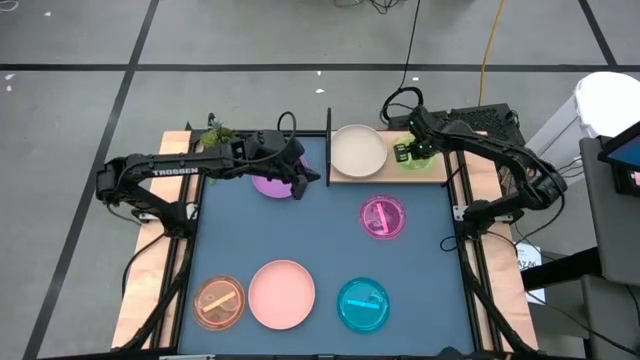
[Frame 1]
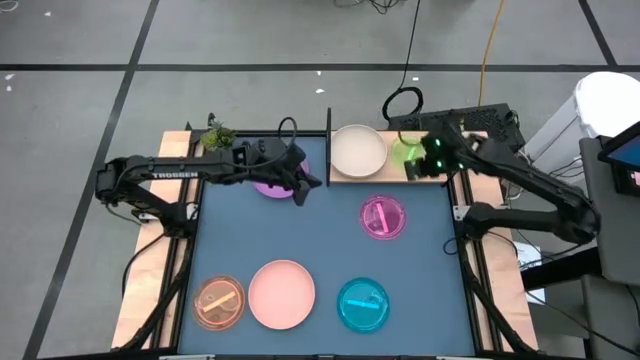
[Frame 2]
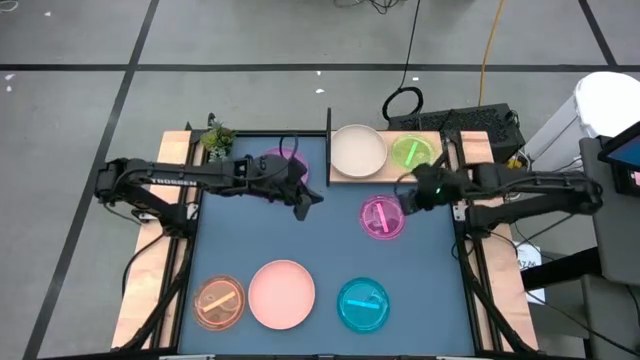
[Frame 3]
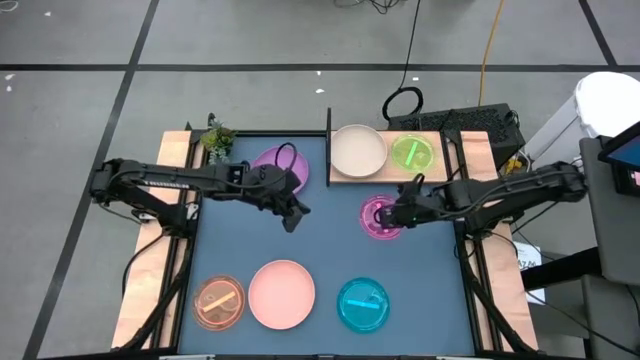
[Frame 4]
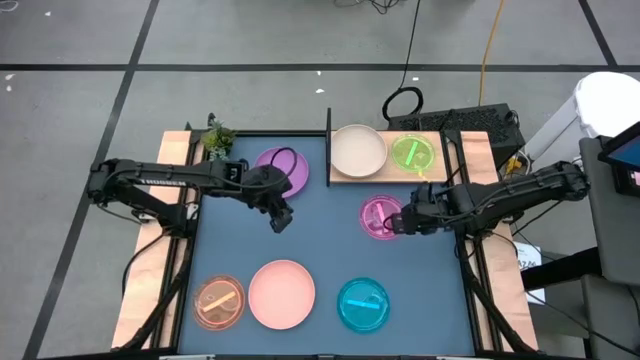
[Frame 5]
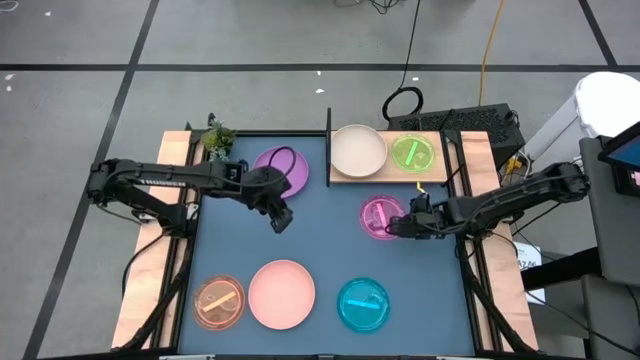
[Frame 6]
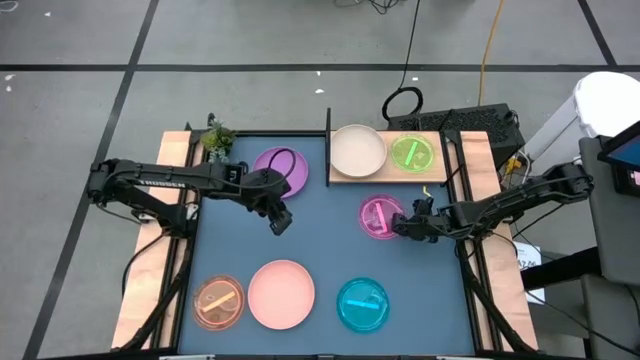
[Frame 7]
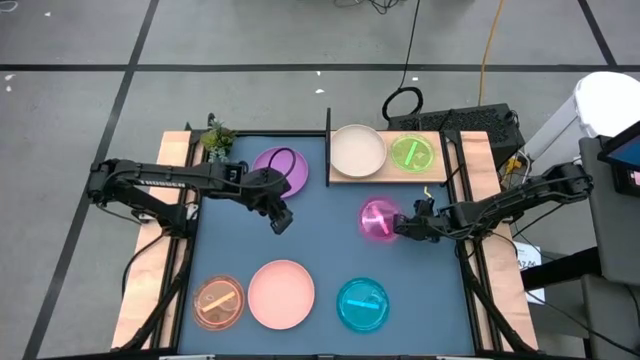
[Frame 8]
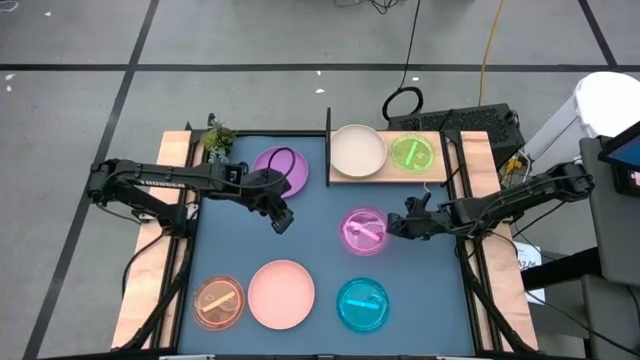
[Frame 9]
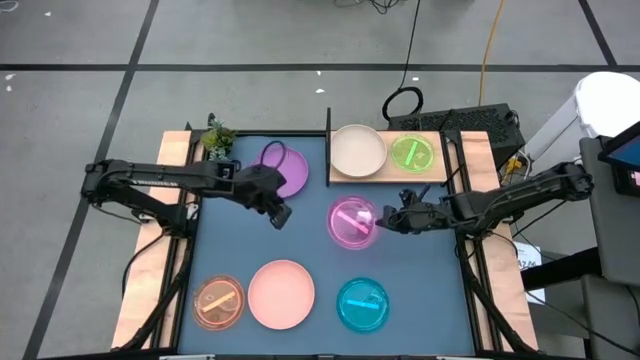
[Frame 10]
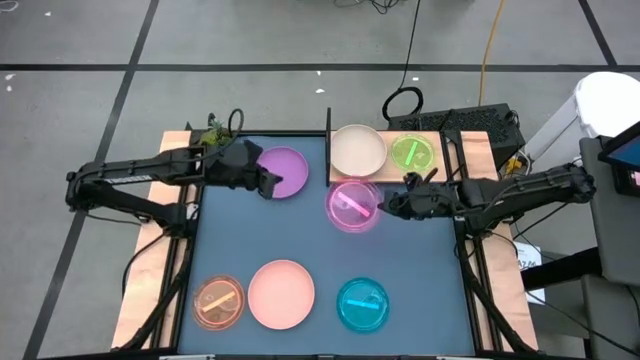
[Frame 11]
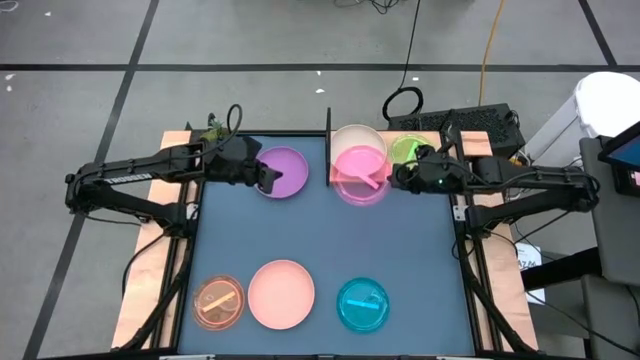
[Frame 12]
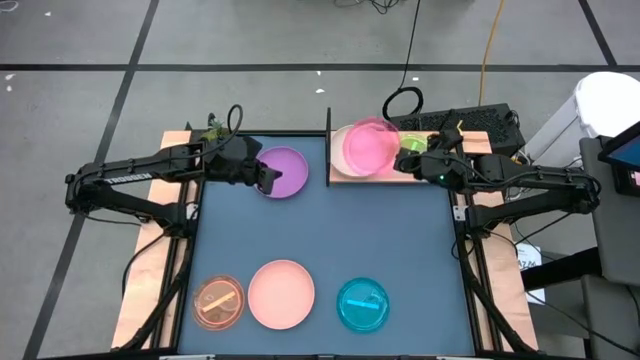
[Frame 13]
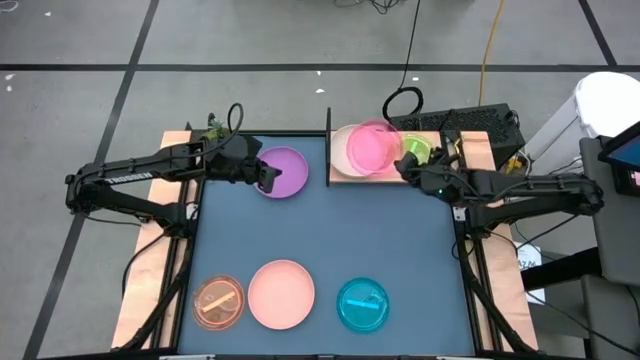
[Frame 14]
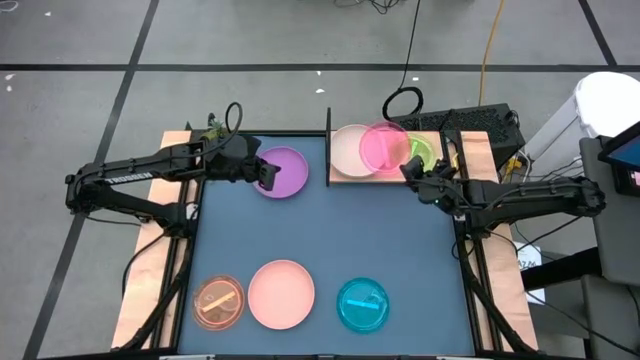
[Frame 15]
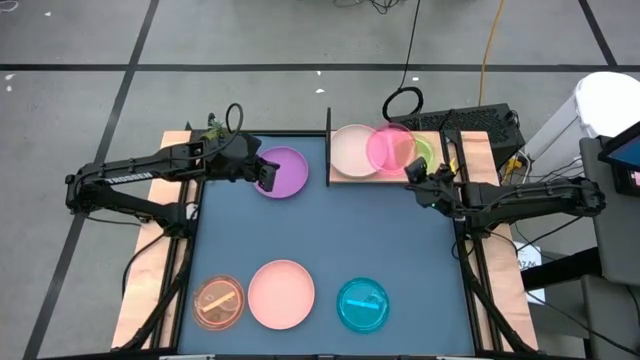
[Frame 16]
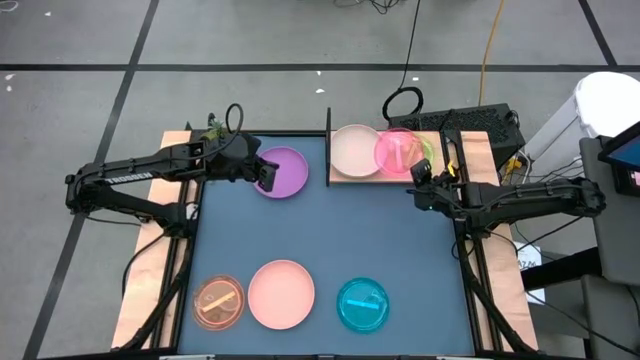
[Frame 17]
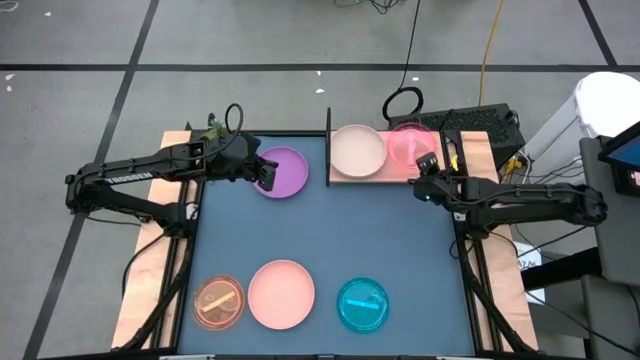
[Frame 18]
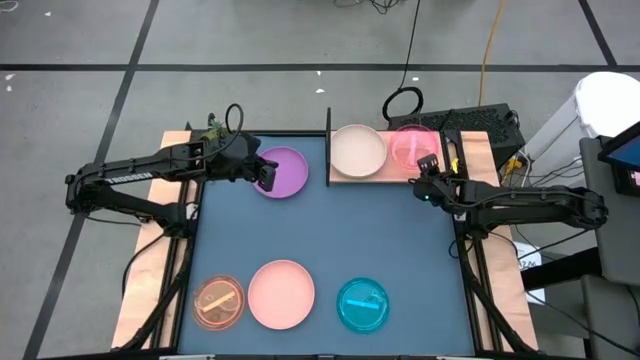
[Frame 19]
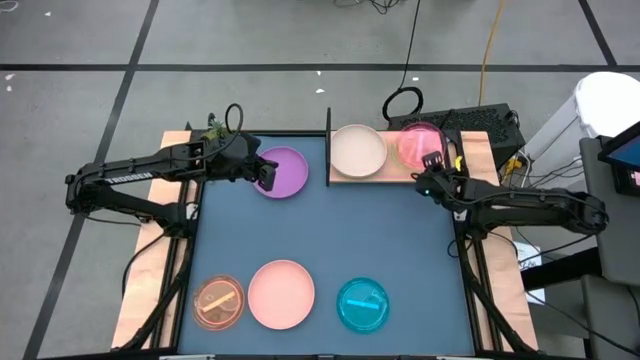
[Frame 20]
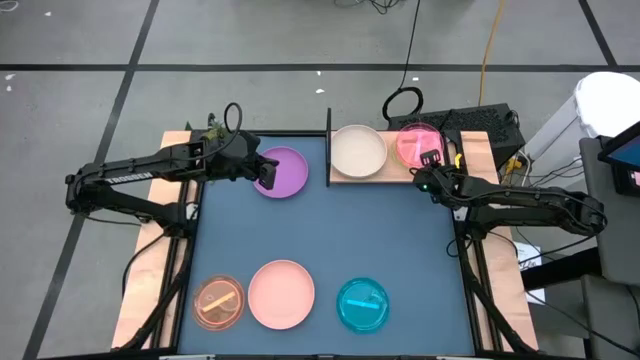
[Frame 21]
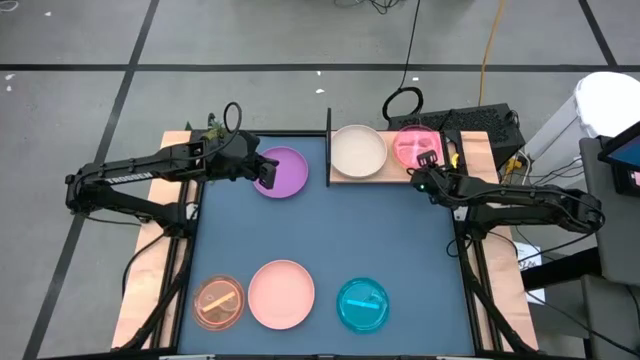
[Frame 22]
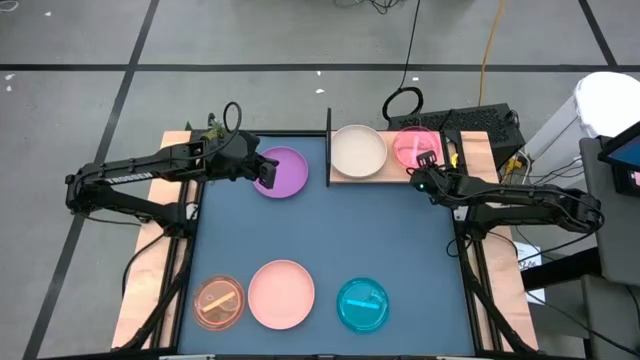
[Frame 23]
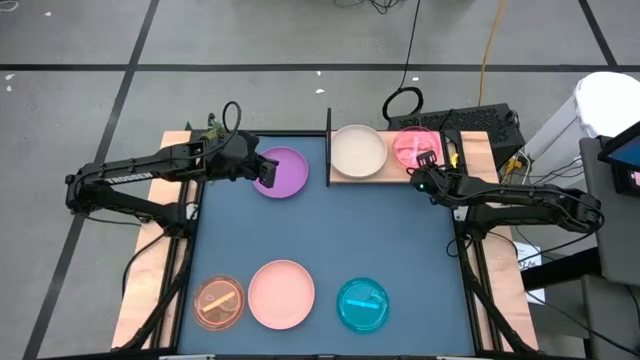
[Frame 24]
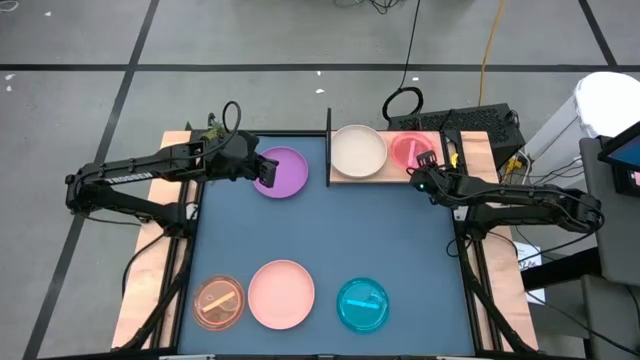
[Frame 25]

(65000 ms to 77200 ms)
Task: Place and stack plates onto a shelf
Stack the pink plate on top of the green plate on the shelf

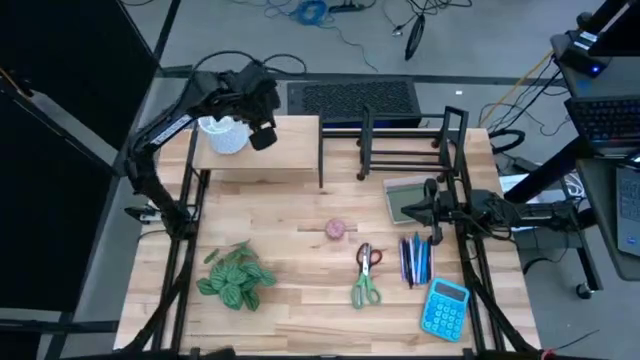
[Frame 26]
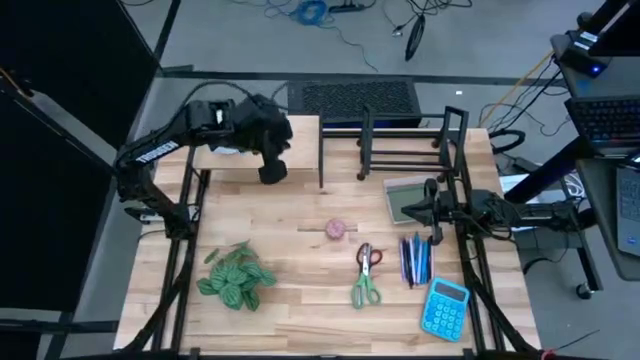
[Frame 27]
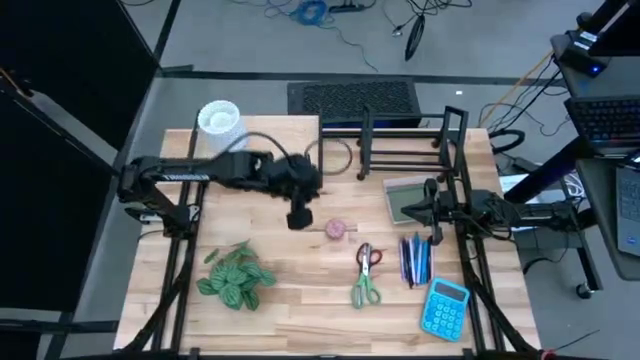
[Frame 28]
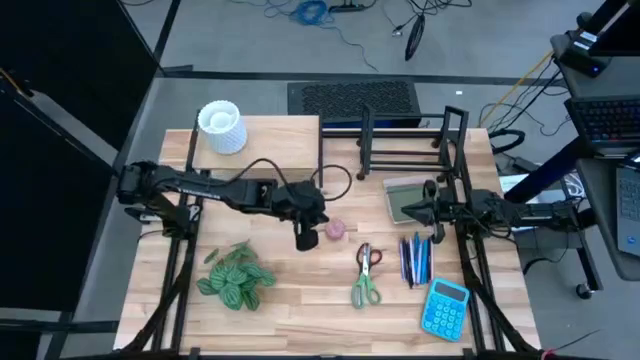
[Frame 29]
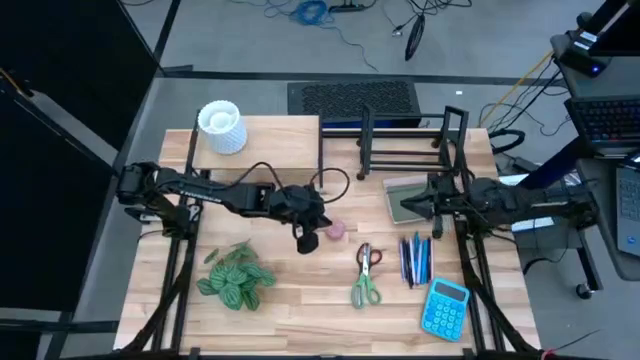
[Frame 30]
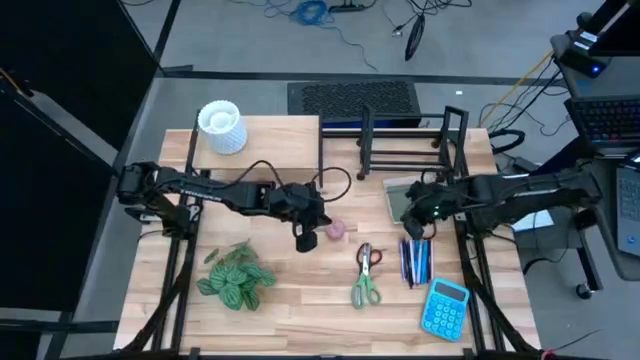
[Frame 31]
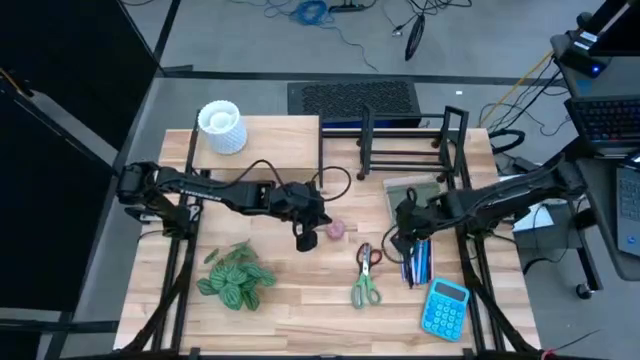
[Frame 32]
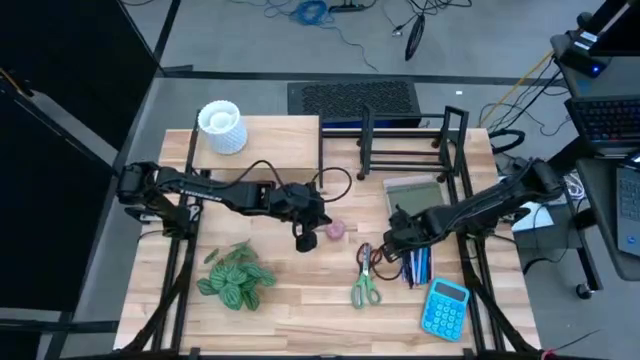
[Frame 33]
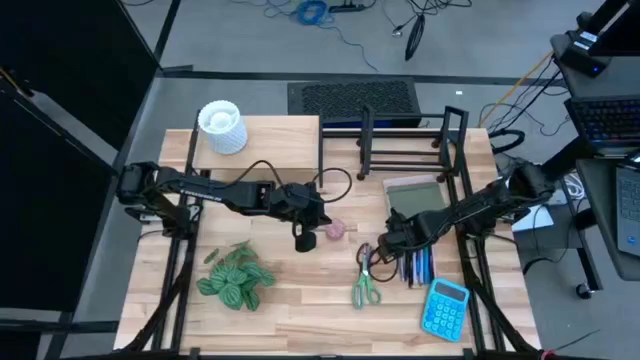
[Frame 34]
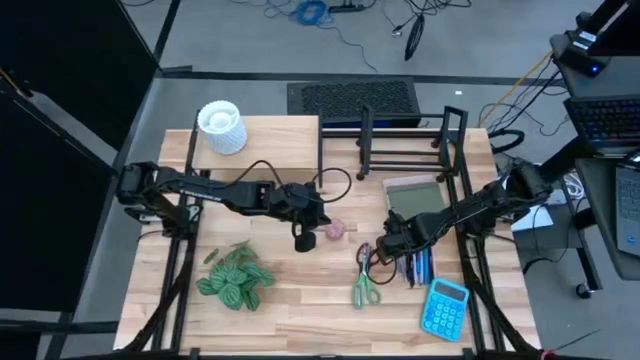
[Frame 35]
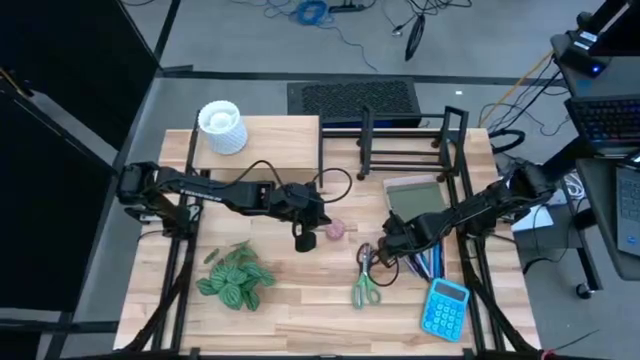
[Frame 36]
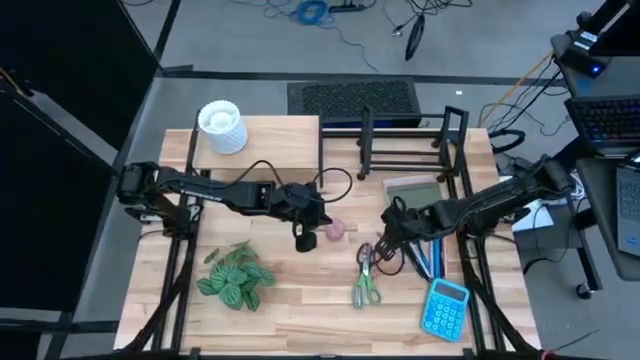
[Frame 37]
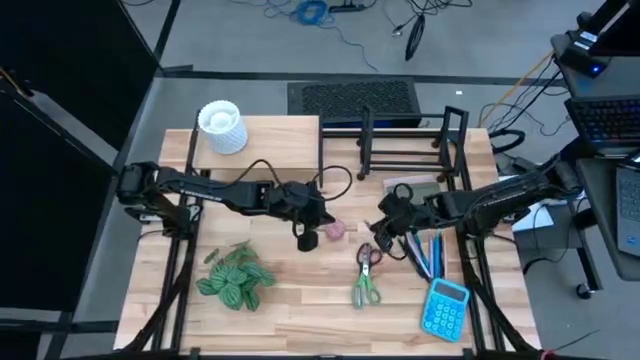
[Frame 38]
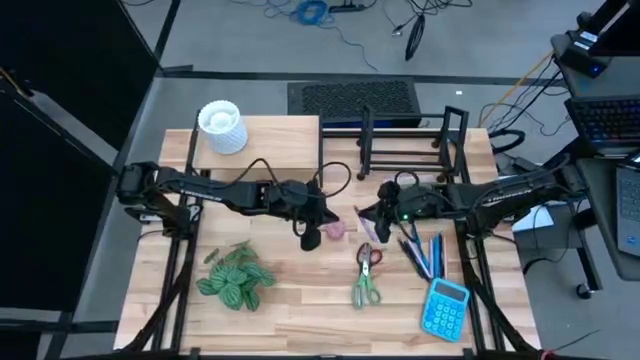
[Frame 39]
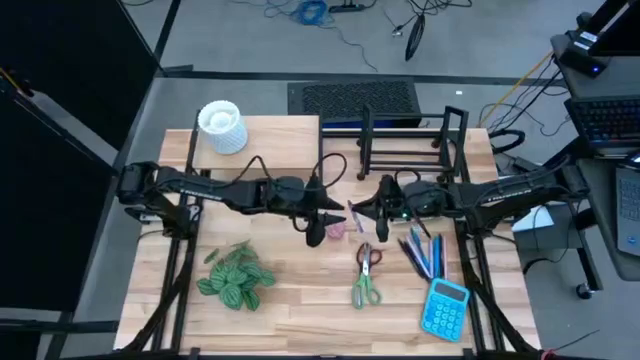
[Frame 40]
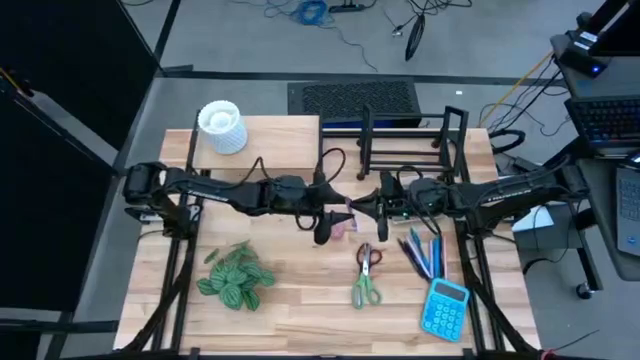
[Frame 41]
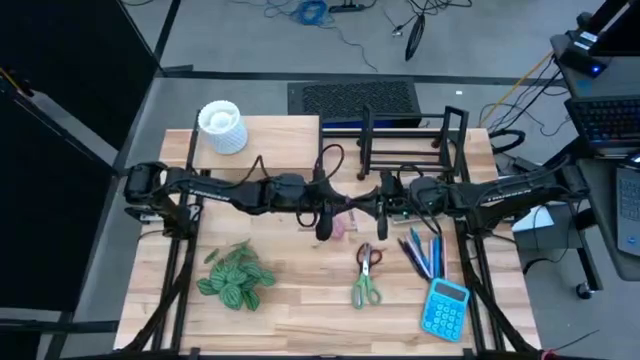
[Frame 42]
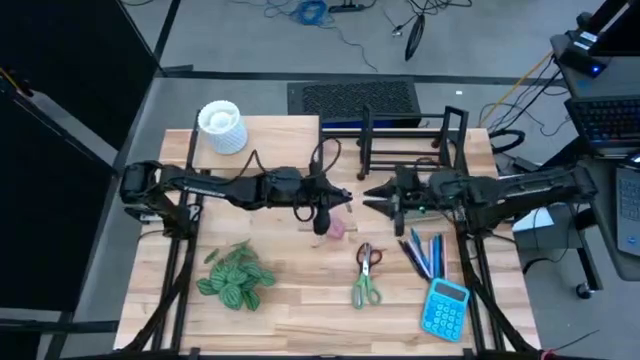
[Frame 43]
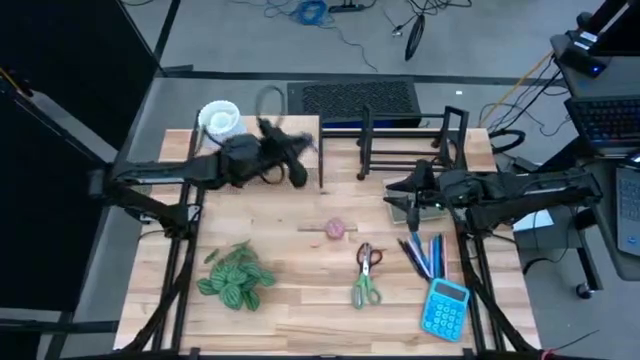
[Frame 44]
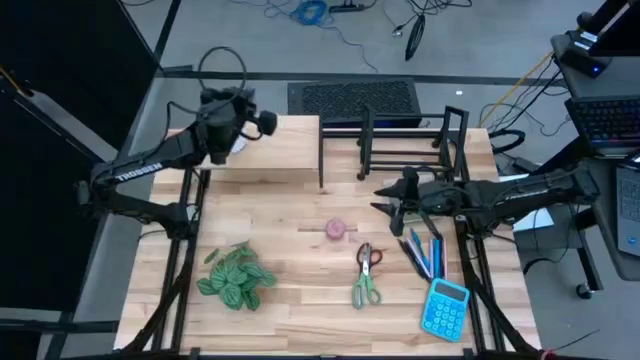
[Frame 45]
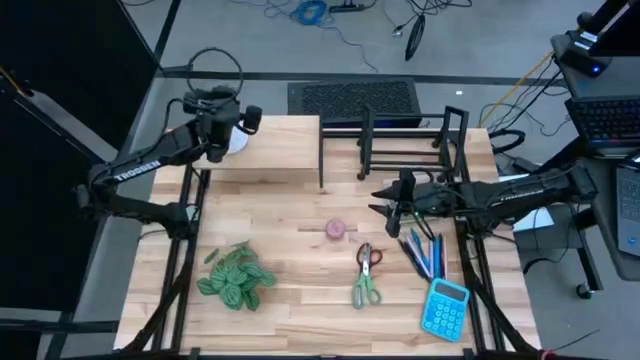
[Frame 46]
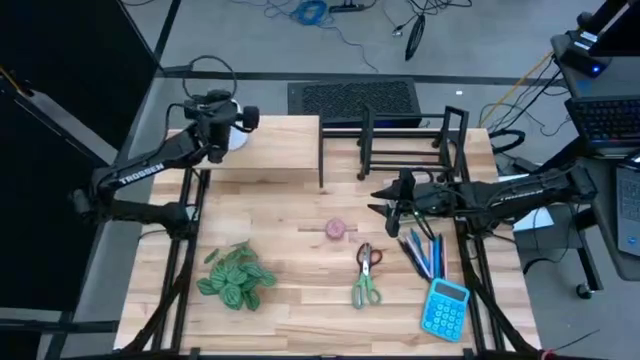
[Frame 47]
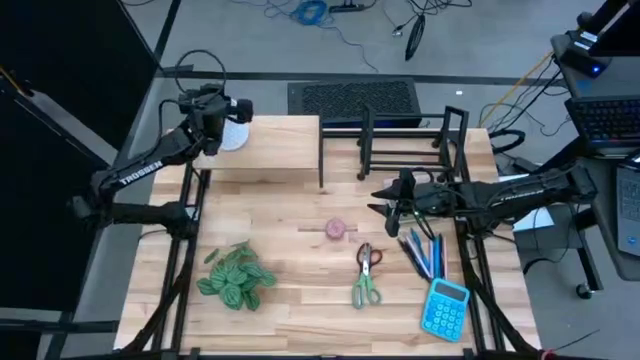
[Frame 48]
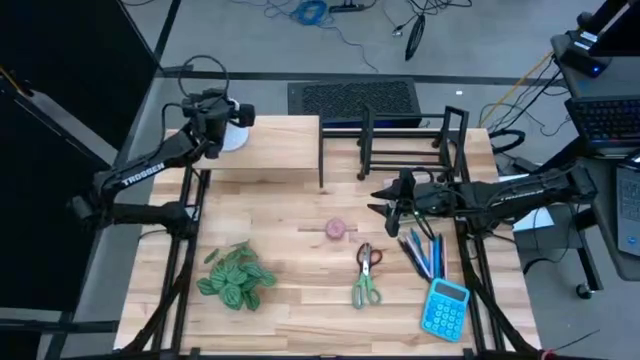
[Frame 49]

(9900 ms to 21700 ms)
Task: Stock shelves
Put the purple pen into the white pen holder
